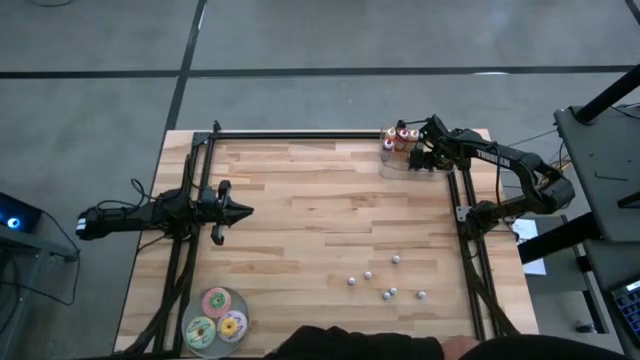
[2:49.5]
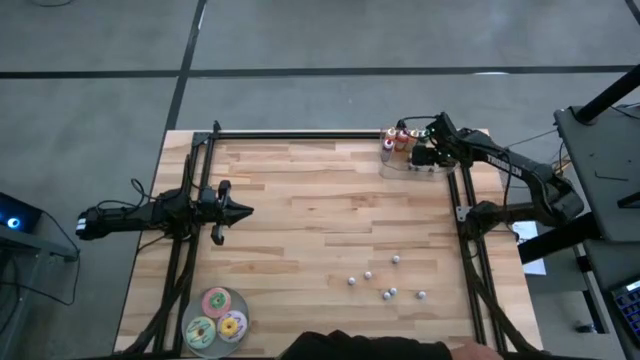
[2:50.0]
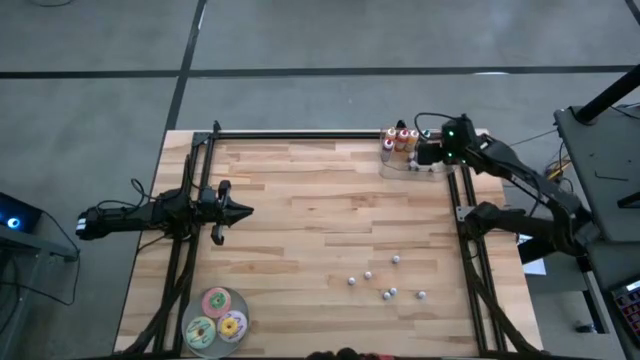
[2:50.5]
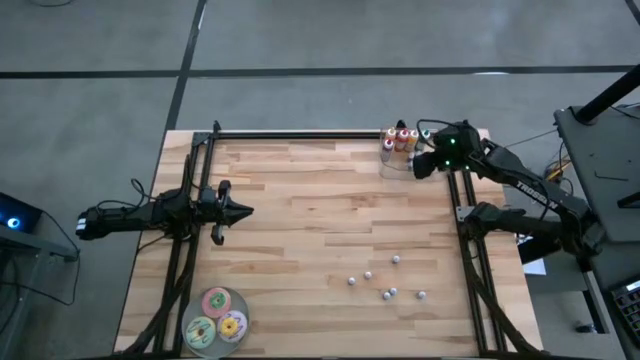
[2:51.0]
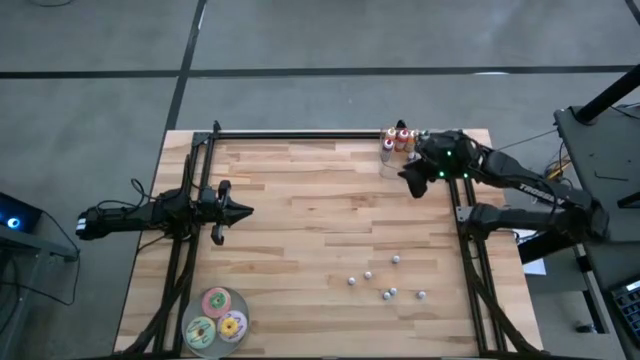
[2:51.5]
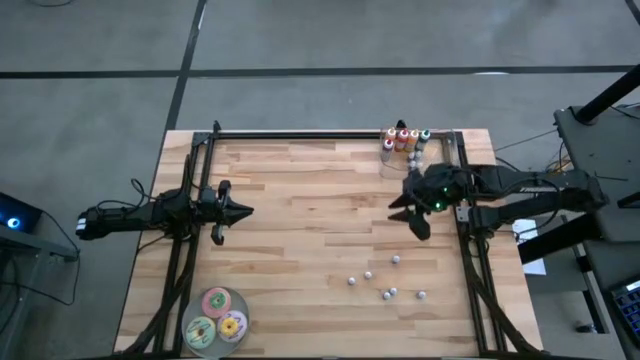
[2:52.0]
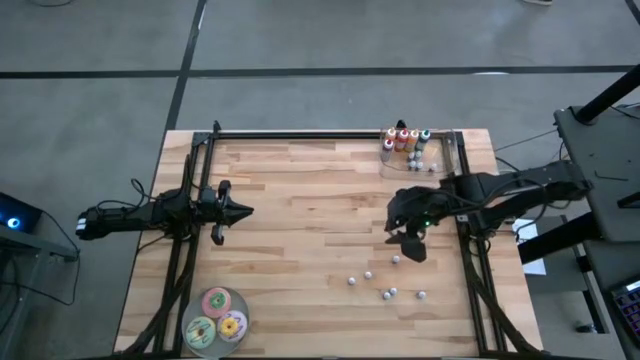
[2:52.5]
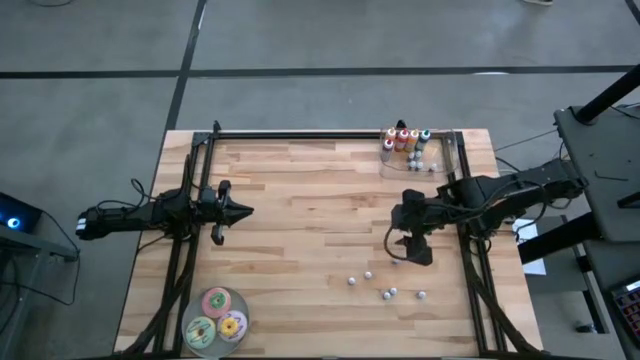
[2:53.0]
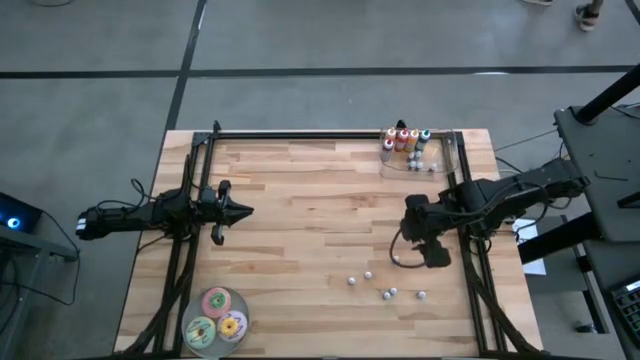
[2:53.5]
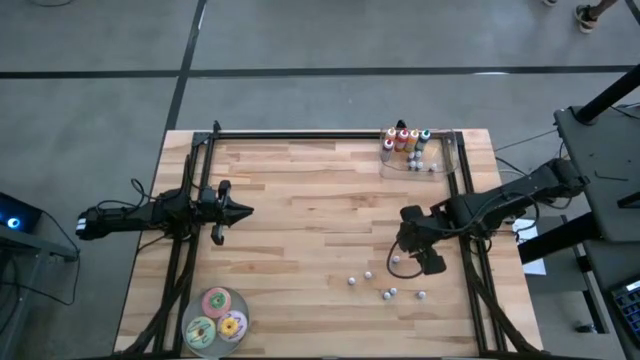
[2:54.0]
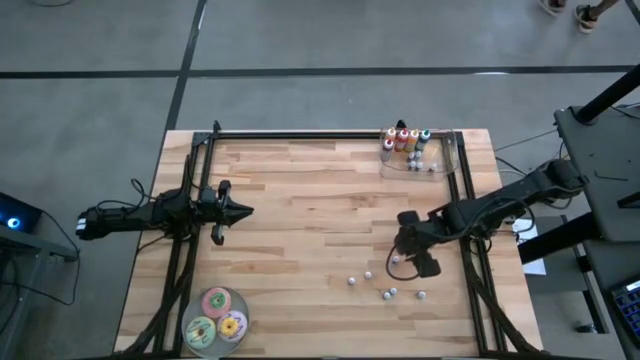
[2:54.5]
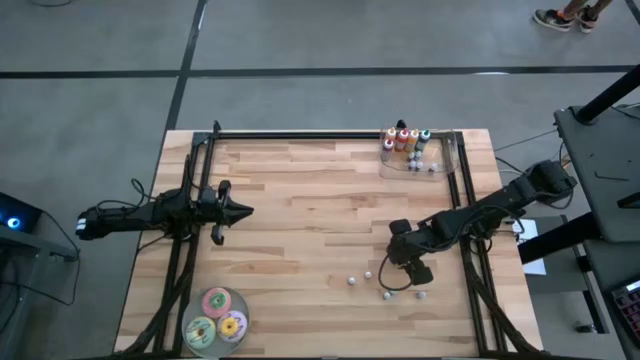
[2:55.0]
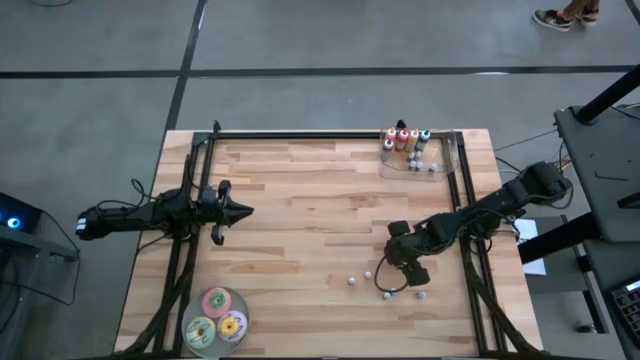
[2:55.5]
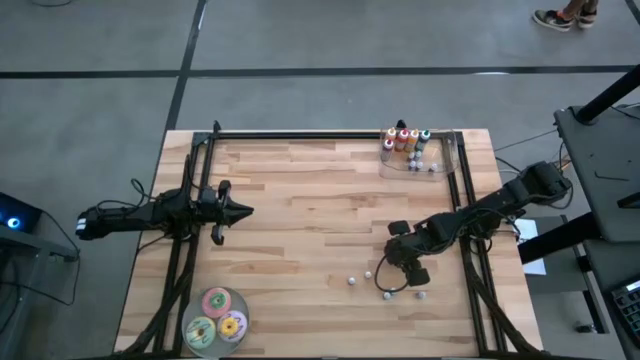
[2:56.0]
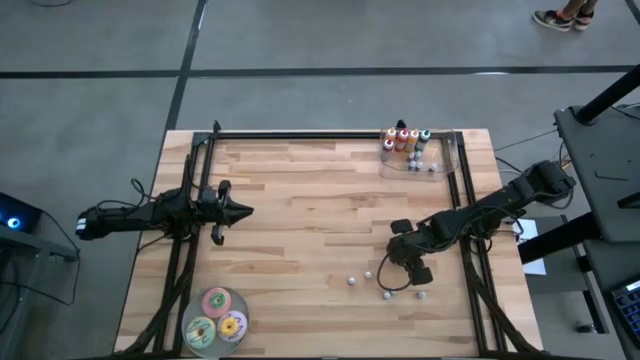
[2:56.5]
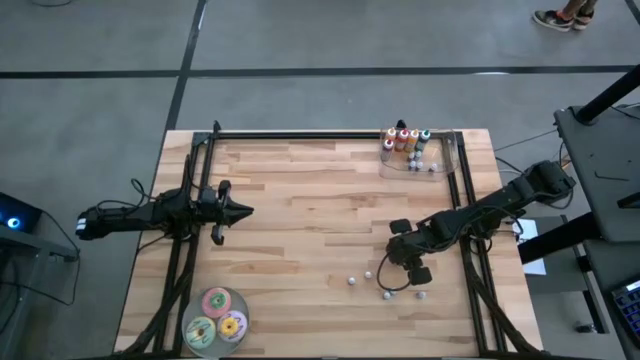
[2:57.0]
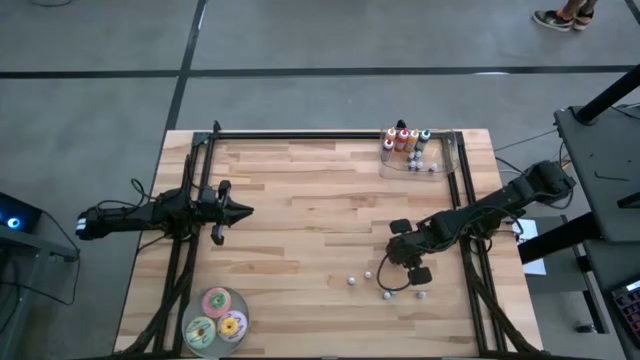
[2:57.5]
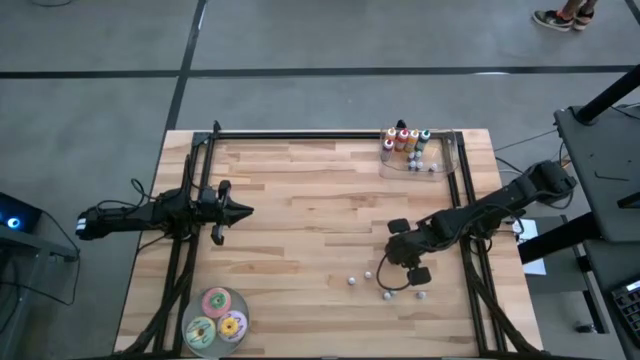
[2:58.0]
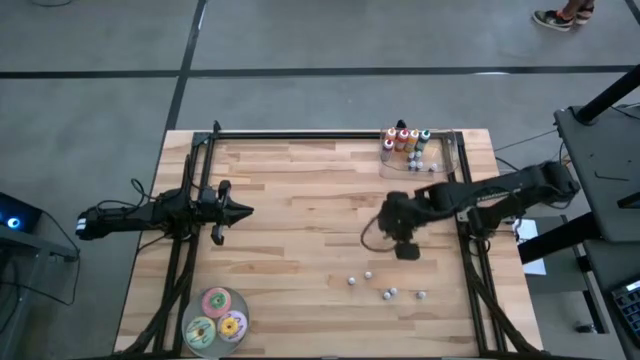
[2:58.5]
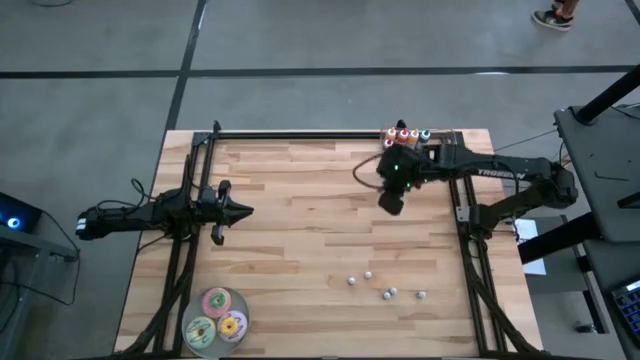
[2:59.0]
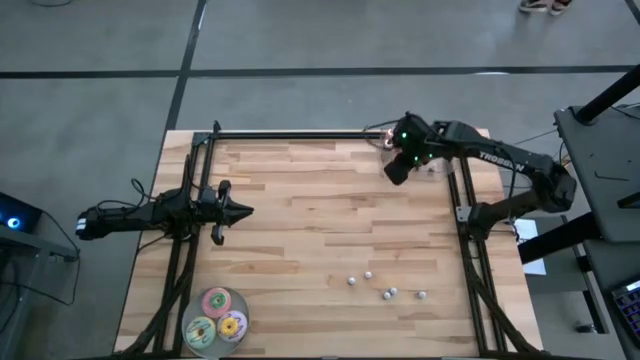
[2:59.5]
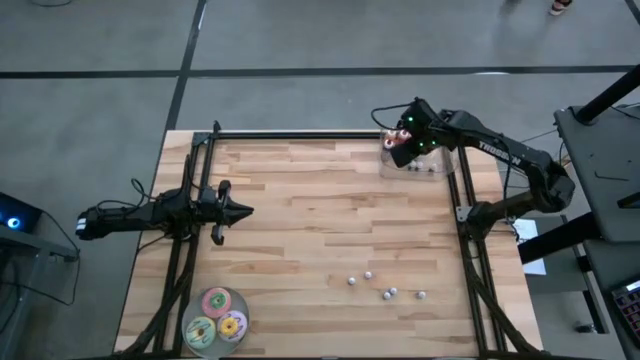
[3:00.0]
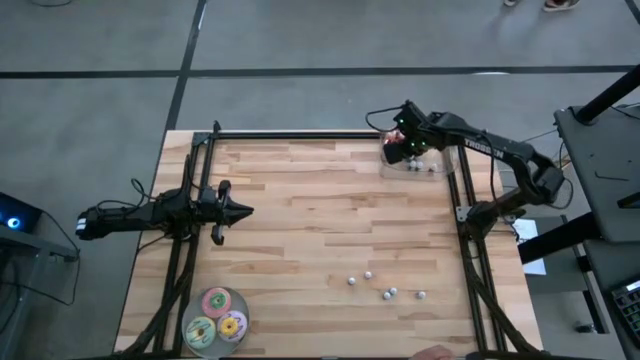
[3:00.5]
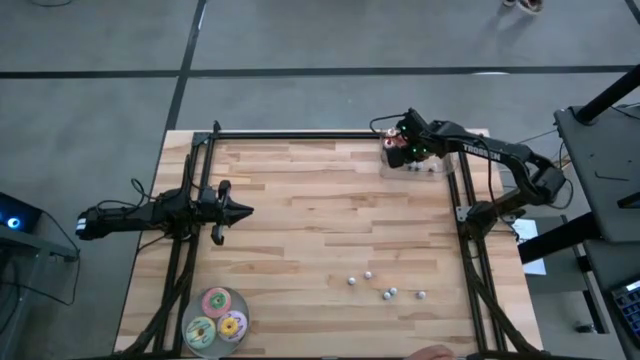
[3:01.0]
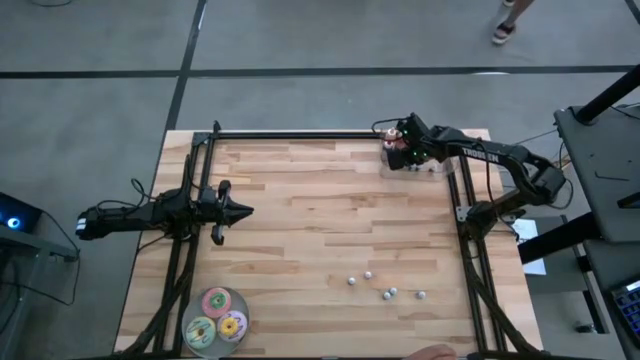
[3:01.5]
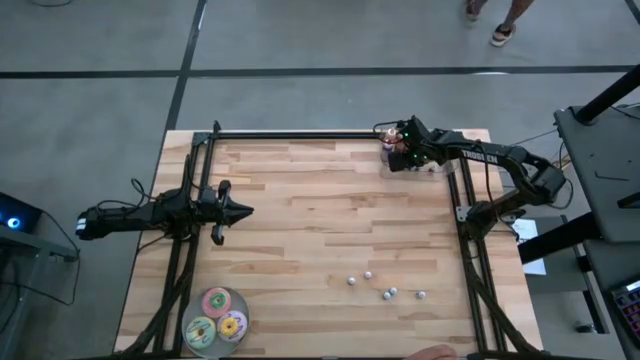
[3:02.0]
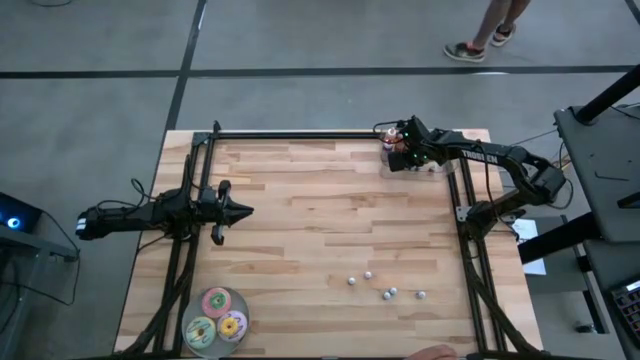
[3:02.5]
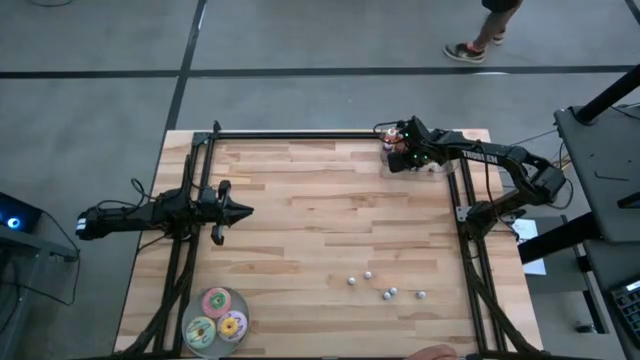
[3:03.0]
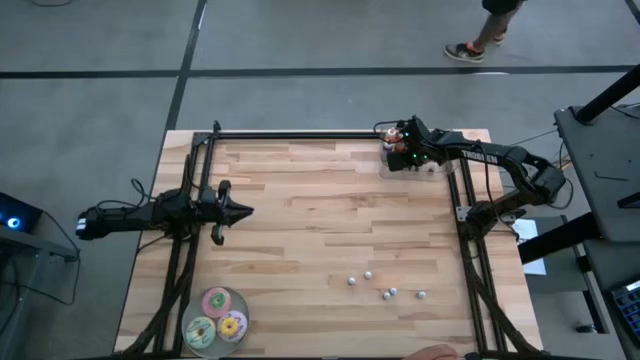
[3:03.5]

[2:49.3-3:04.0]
Task: Pick & Place food coloring
Put the top small orange food coloring bottle into the bin

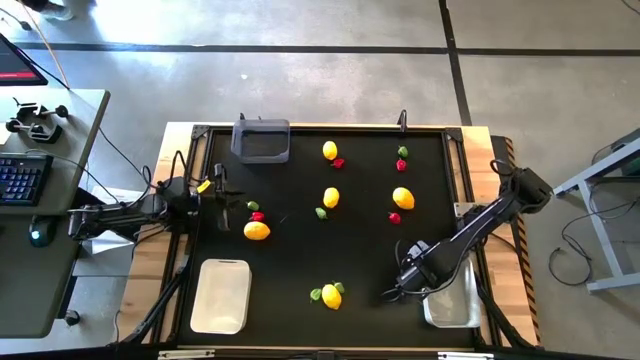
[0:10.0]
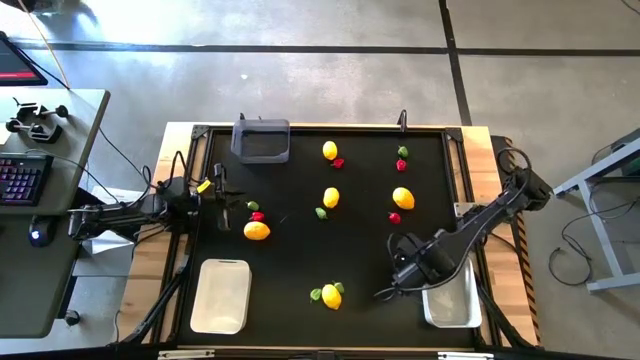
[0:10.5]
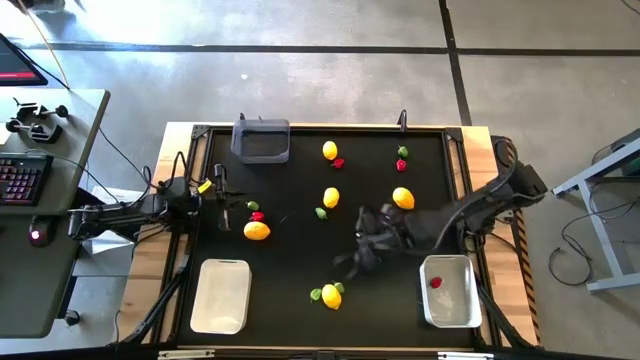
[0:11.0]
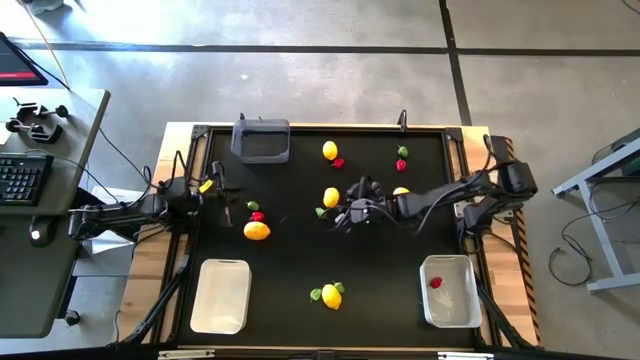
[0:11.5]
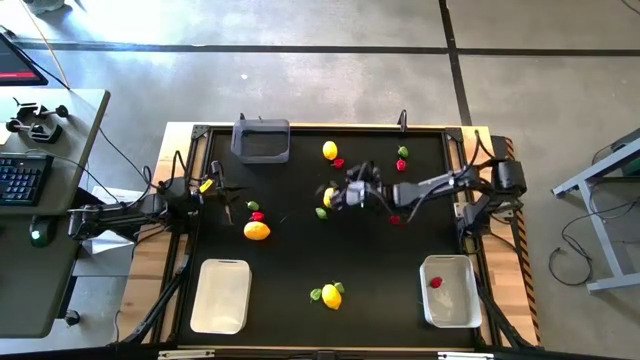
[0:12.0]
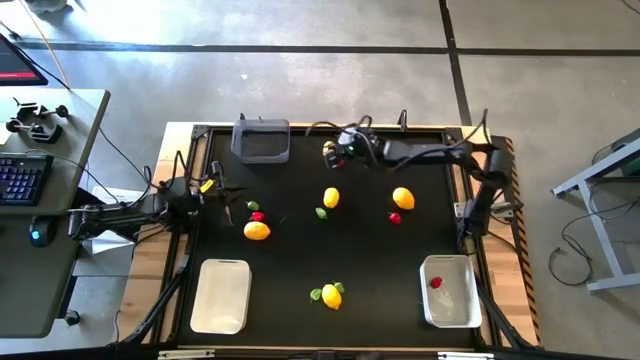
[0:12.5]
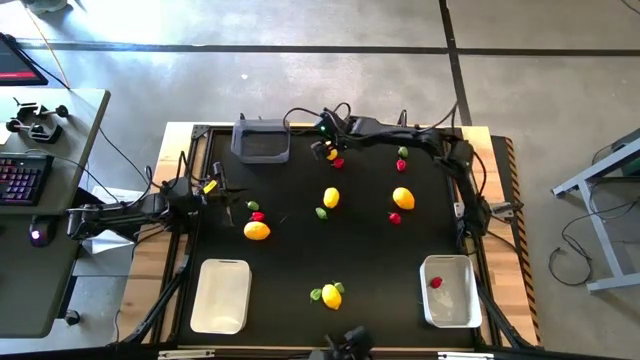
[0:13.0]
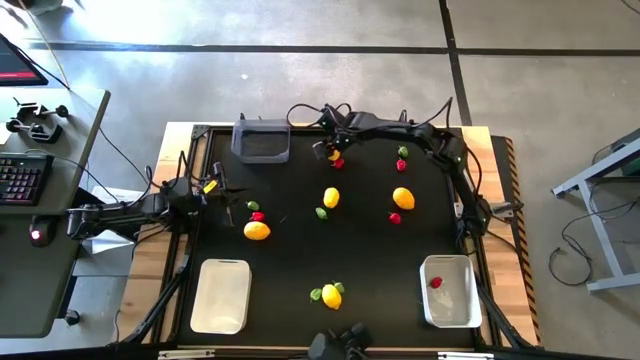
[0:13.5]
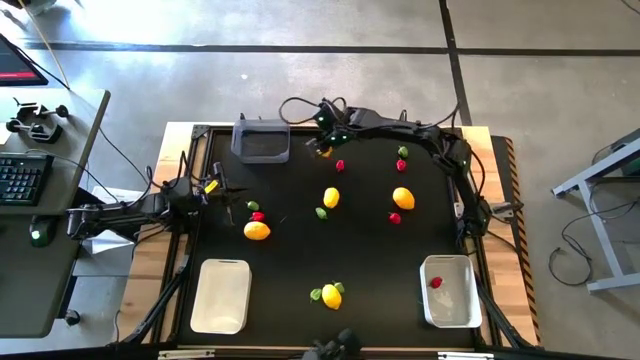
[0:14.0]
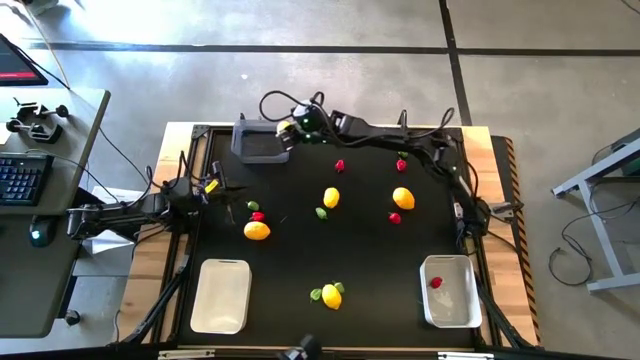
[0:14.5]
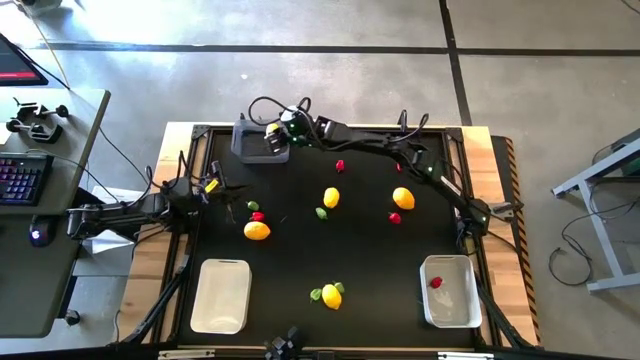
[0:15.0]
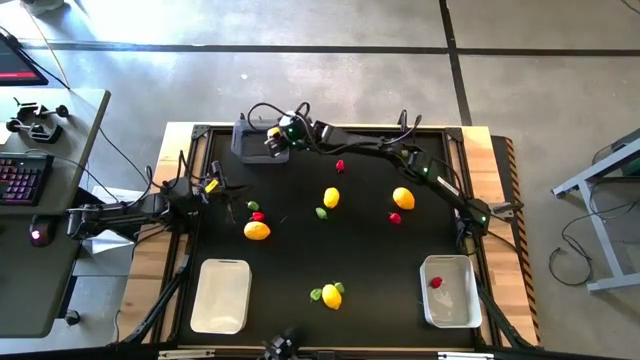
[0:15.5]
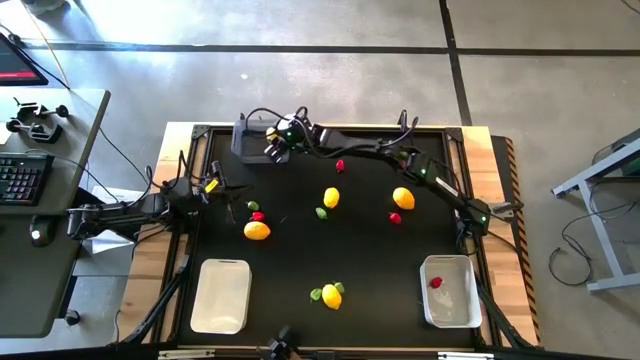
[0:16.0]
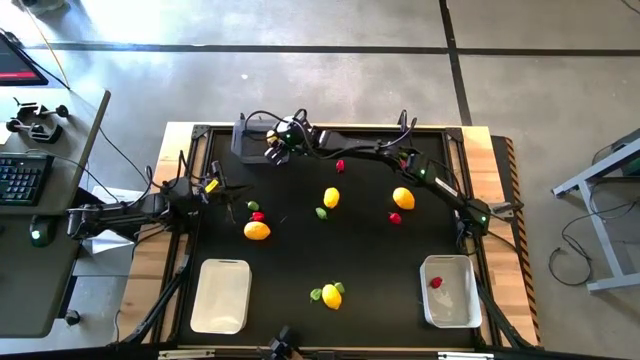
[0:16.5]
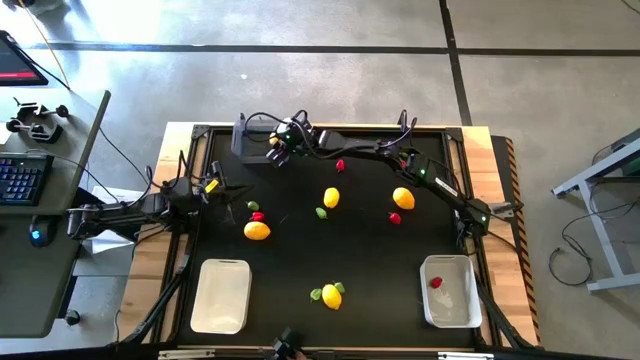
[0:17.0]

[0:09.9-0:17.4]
Task: Sort produce into baskets
Put the yellow lemon into the black bin
